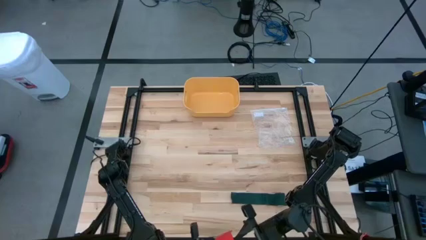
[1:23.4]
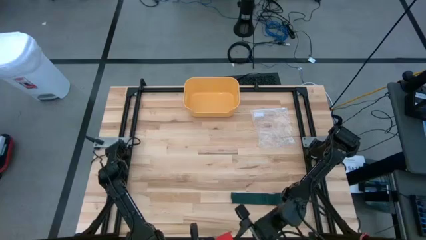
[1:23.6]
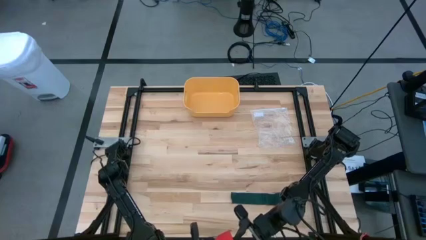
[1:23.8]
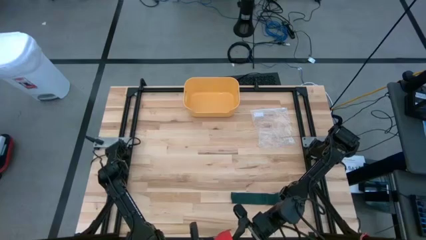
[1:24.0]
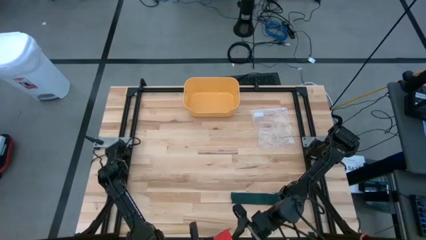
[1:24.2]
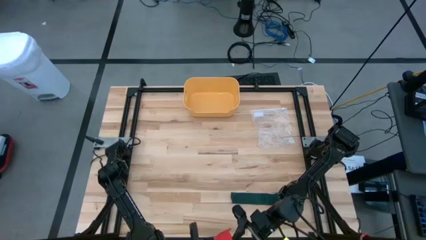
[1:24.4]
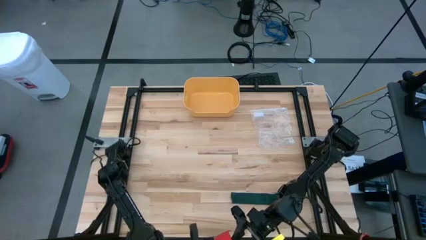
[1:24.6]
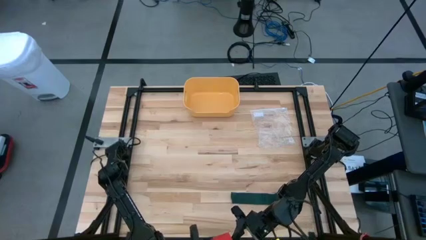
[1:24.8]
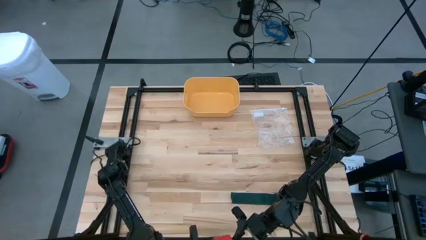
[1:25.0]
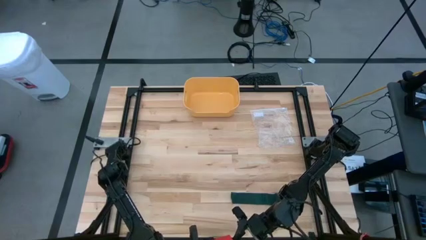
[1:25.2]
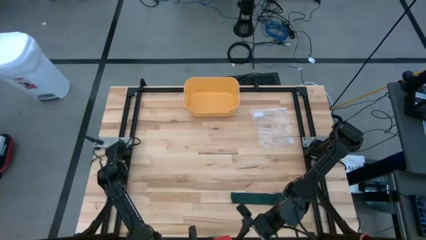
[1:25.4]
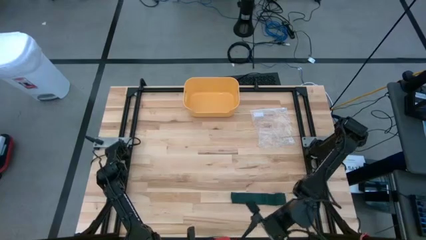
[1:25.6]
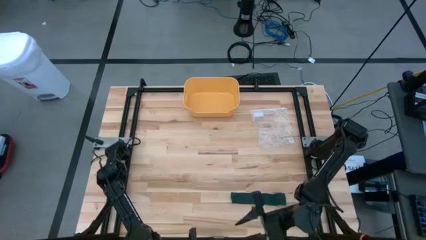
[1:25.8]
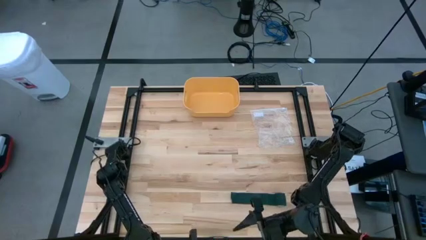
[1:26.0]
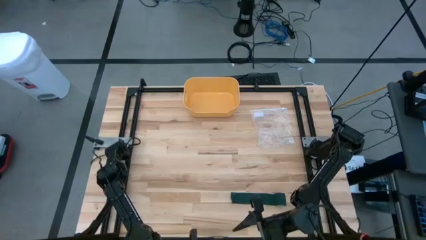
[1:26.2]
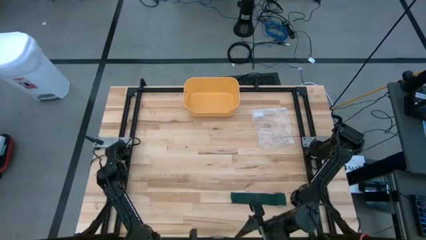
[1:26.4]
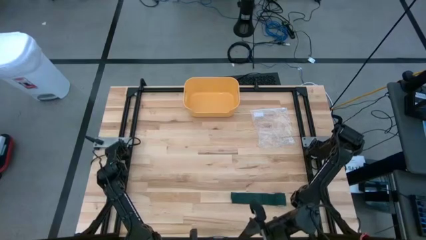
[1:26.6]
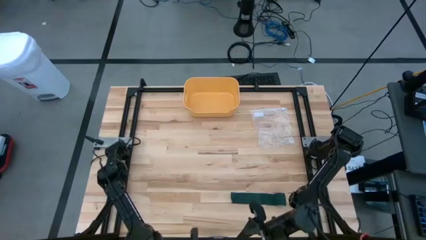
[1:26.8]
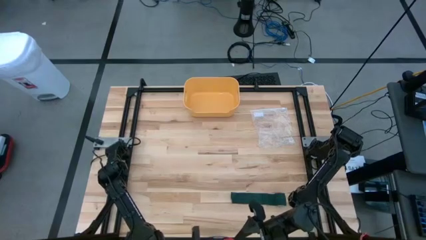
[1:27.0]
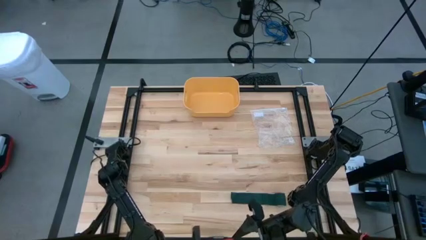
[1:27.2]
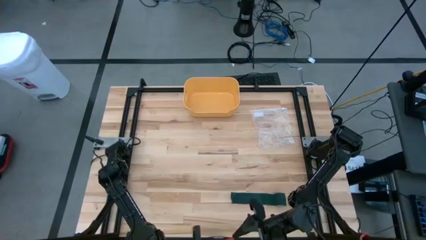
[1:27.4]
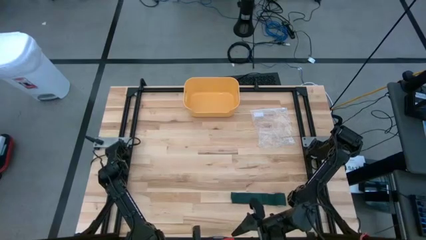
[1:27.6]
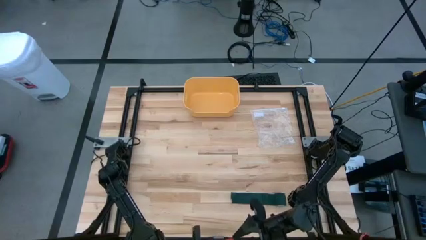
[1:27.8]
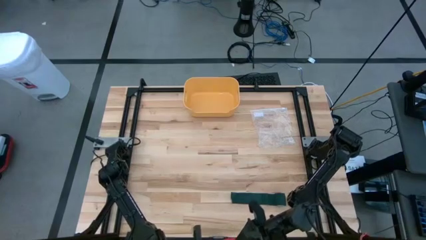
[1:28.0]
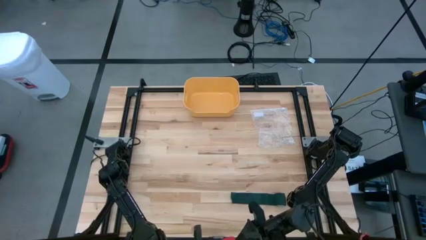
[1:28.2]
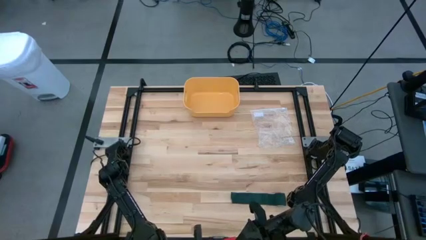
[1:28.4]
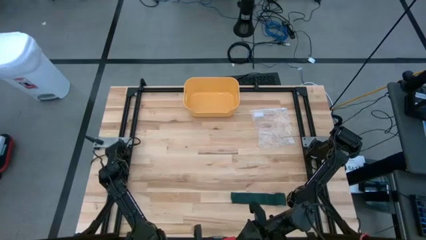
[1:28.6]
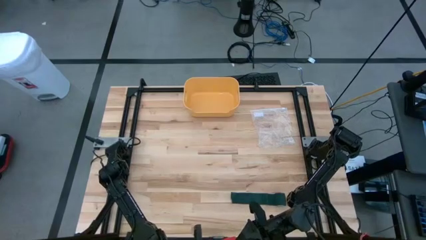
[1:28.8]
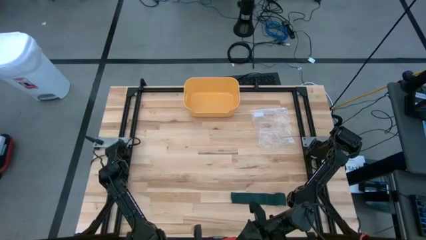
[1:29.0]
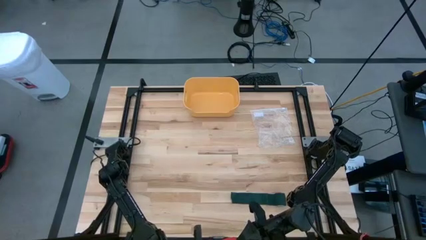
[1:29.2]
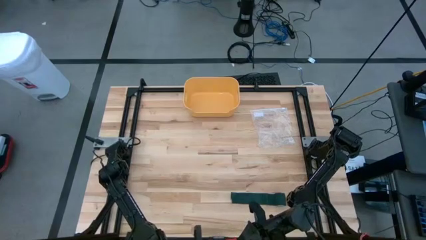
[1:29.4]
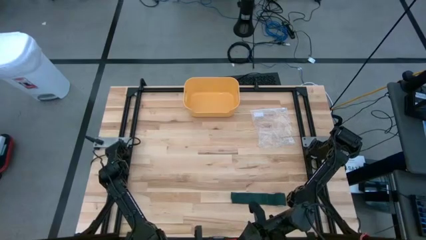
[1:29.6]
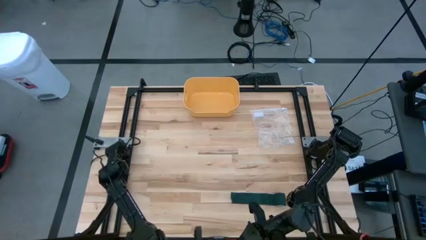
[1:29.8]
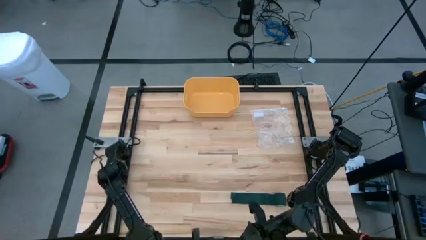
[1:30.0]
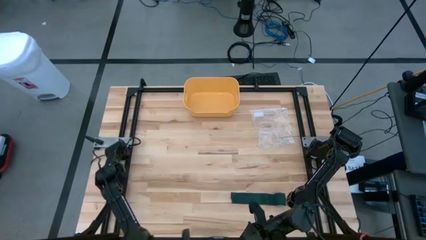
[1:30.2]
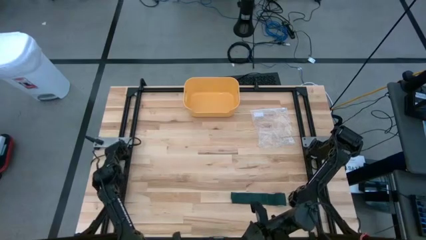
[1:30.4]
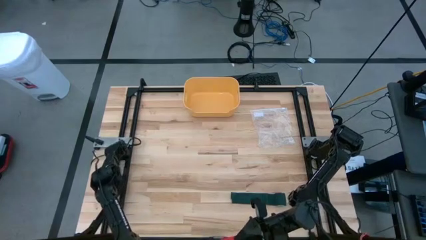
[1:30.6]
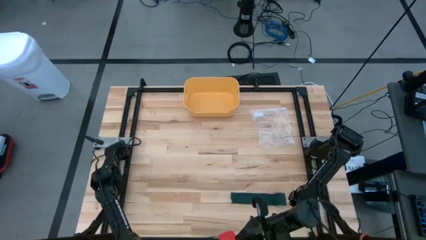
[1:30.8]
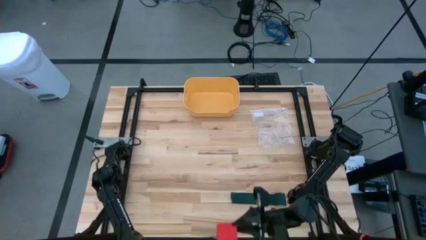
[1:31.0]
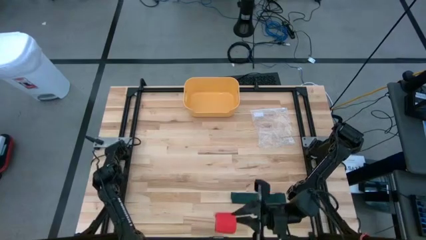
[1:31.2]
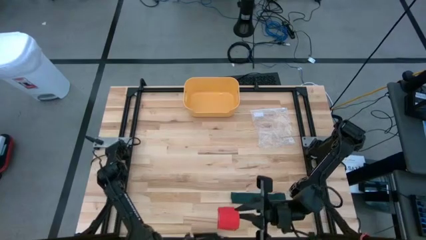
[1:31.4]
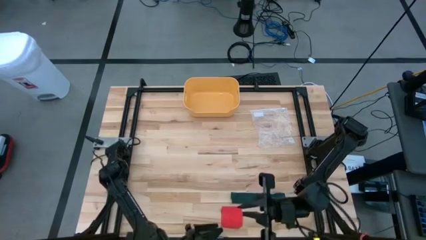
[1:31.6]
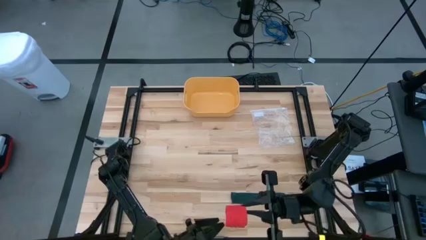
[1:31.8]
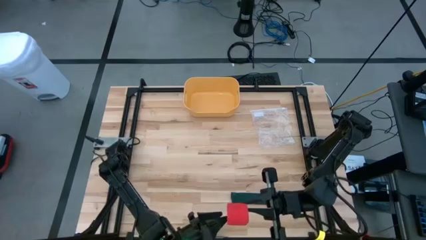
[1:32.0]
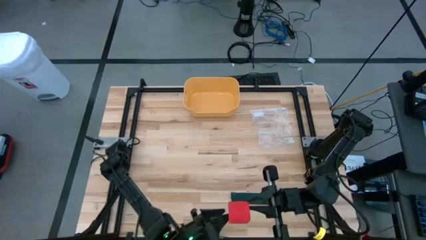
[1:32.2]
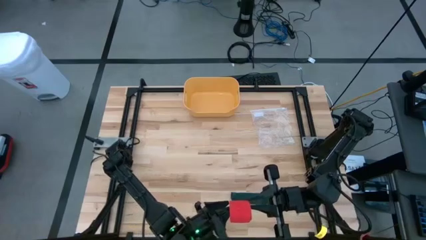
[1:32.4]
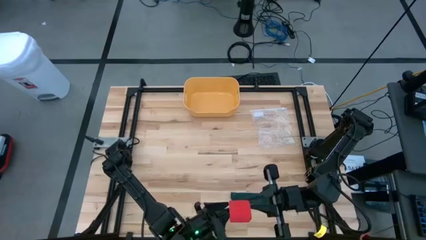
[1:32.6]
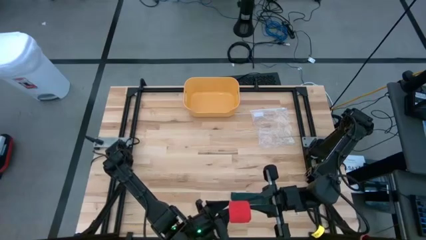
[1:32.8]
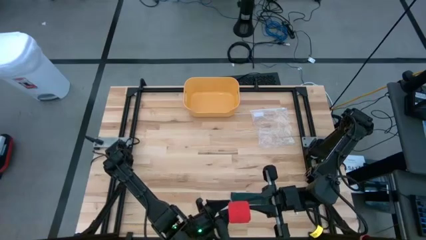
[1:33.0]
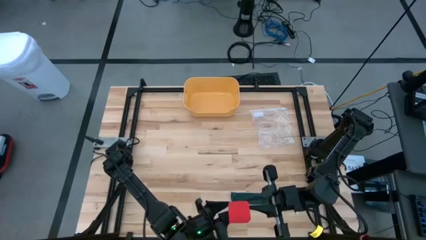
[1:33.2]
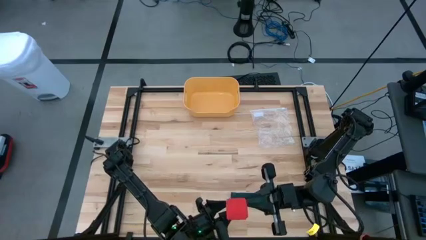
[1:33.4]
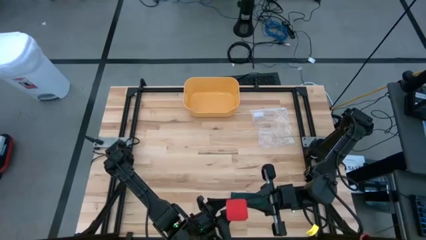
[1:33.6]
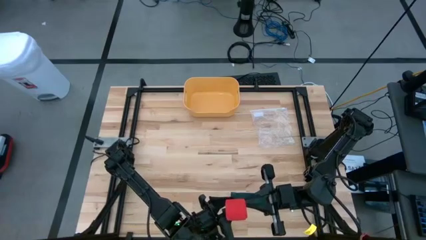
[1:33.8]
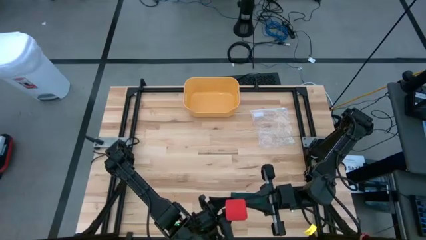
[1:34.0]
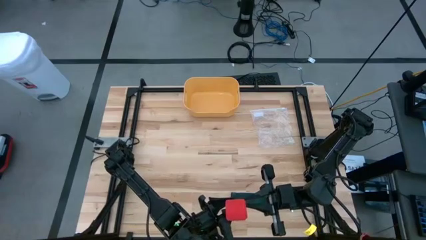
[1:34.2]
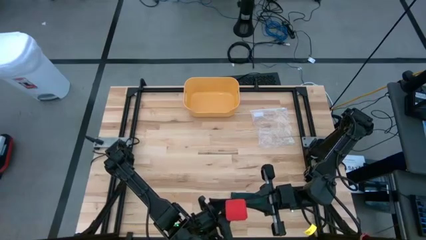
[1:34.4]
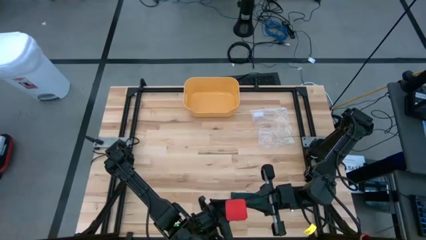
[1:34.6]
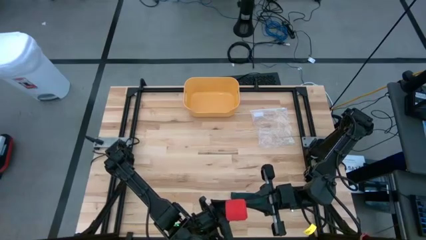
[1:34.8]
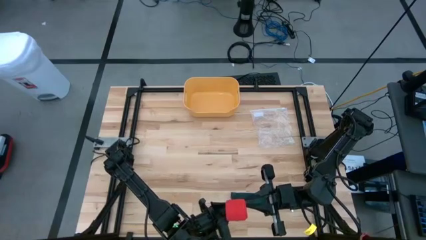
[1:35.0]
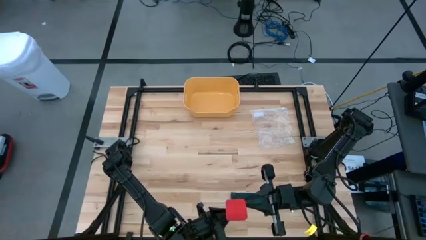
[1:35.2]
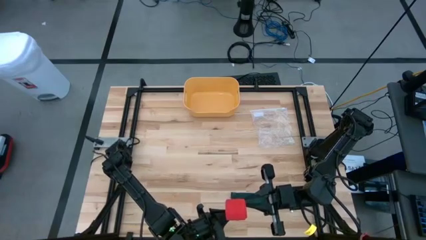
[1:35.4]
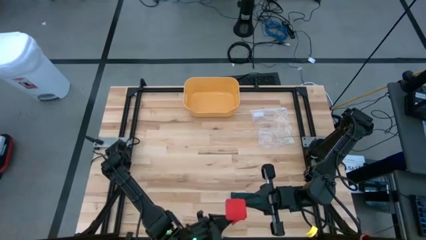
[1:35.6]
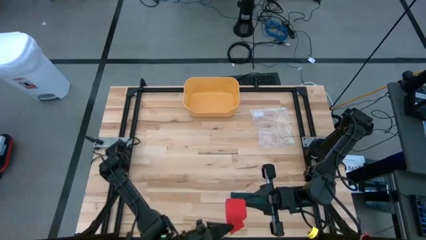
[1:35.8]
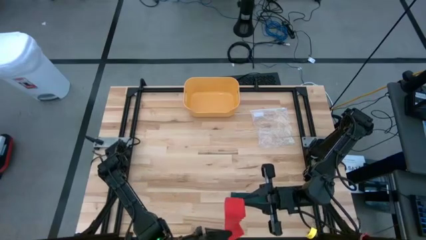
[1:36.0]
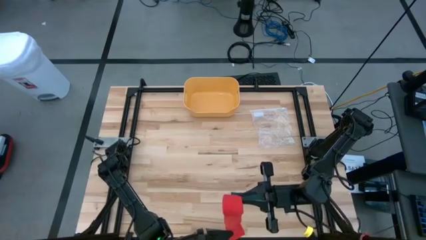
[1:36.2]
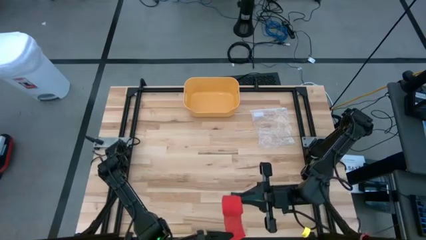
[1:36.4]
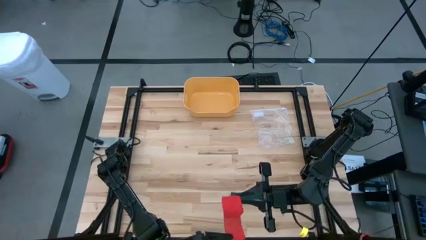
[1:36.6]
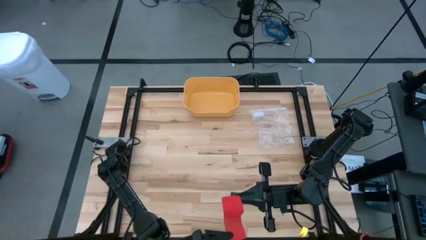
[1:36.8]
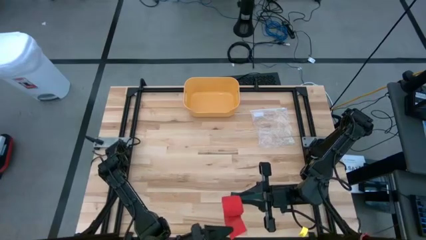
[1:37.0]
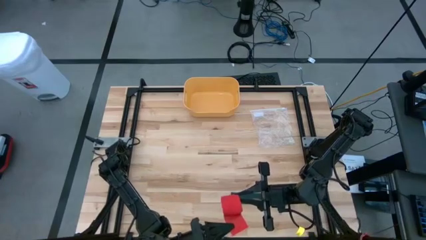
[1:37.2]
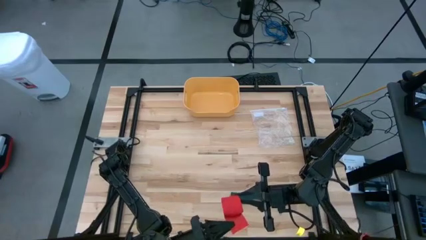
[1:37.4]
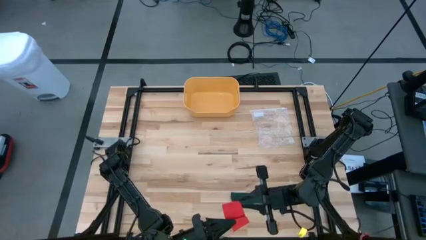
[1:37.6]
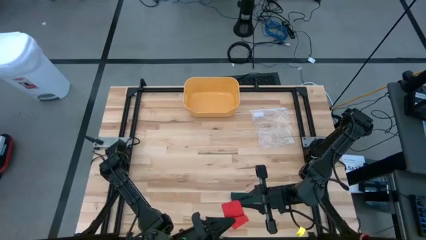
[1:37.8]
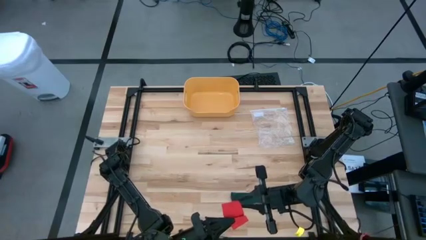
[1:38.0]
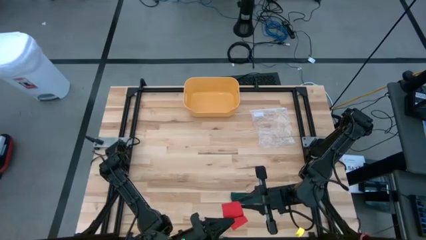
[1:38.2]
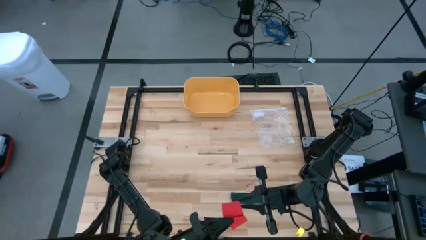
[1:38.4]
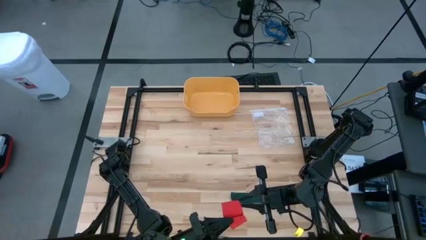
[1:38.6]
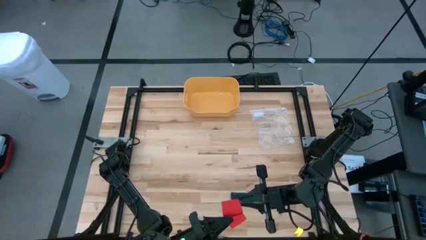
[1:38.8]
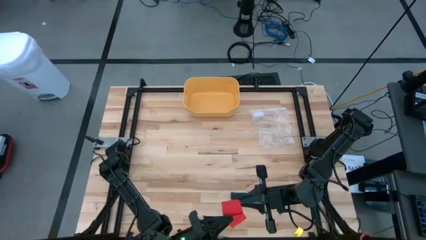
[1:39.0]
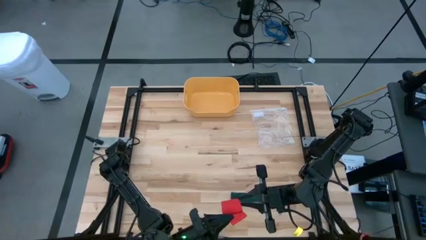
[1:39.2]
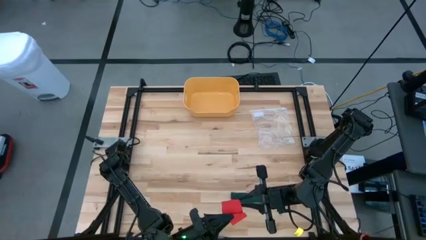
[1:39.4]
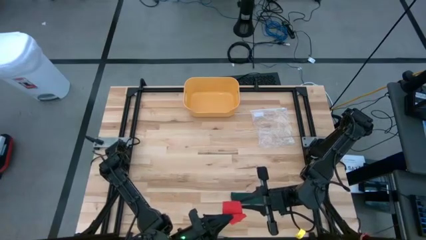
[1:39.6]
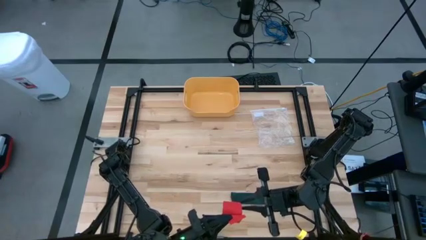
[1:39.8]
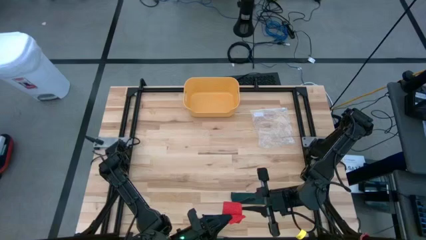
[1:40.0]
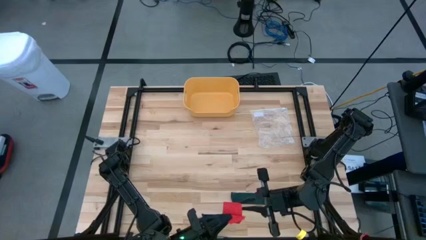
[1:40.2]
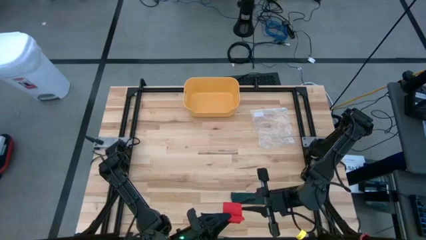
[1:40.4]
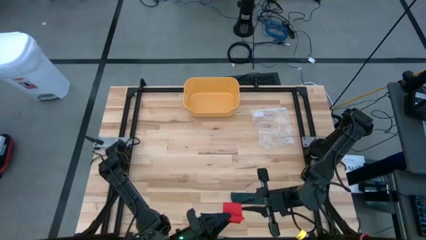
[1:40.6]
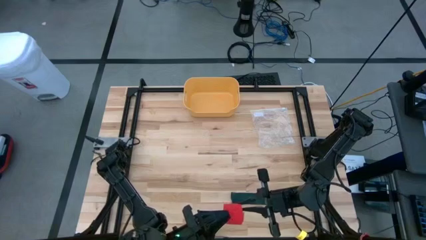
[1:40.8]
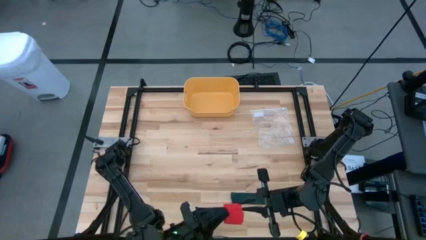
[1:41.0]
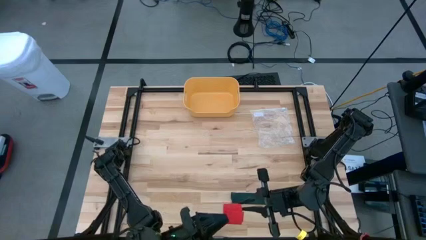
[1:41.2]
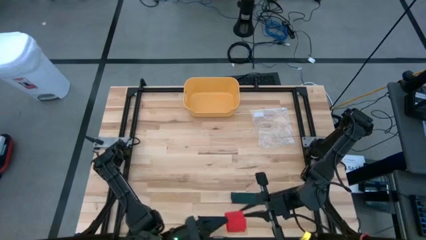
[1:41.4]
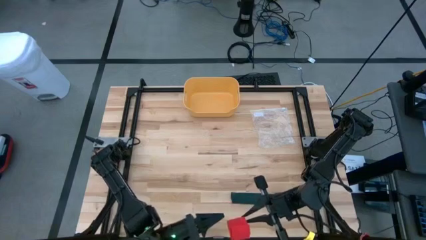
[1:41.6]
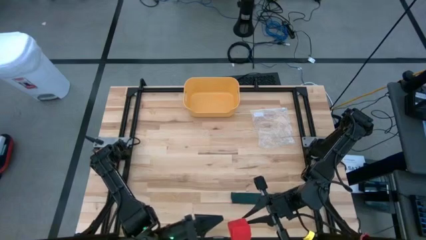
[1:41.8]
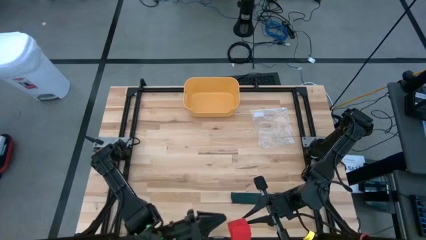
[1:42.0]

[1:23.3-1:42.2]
Task: Roll bandage
Roll the red bandage
